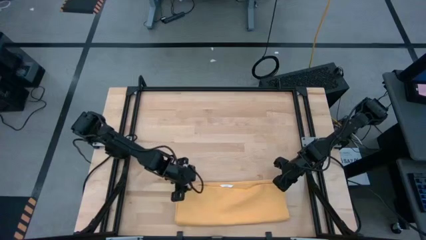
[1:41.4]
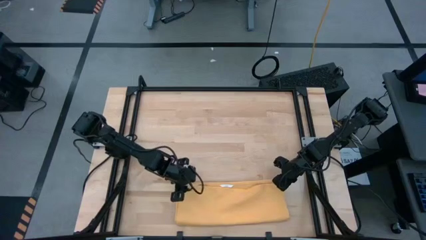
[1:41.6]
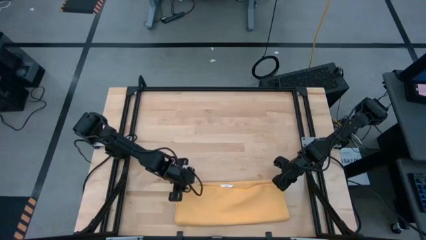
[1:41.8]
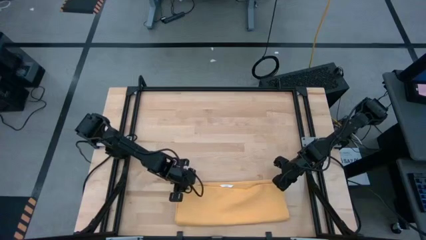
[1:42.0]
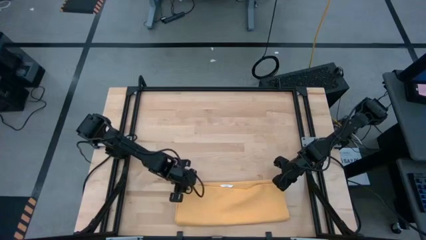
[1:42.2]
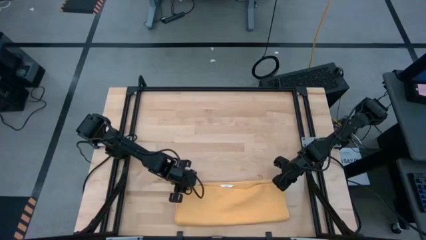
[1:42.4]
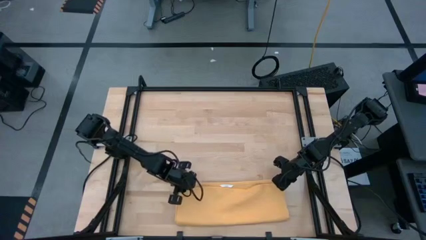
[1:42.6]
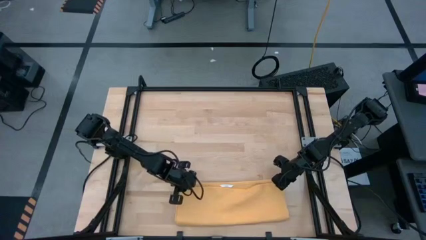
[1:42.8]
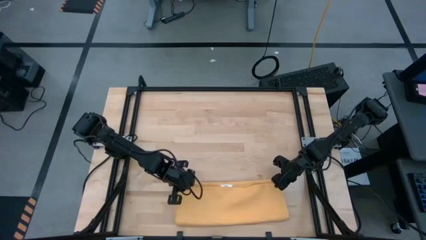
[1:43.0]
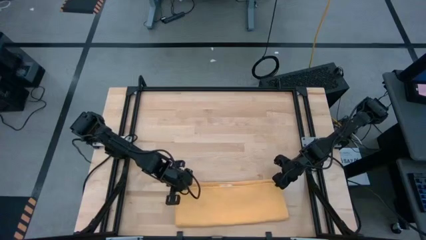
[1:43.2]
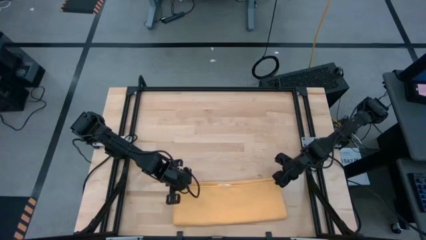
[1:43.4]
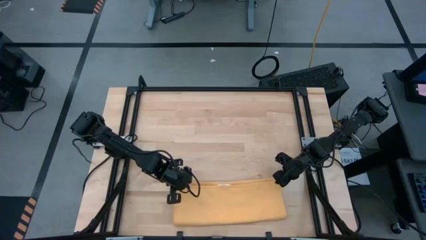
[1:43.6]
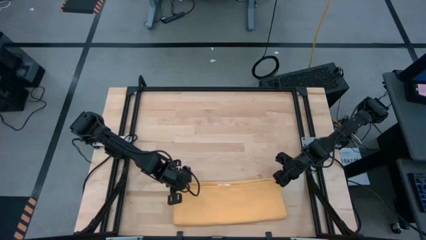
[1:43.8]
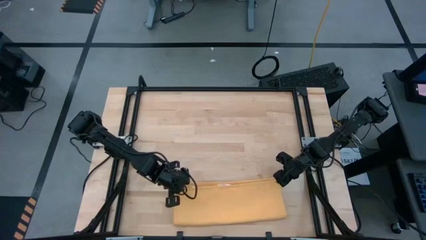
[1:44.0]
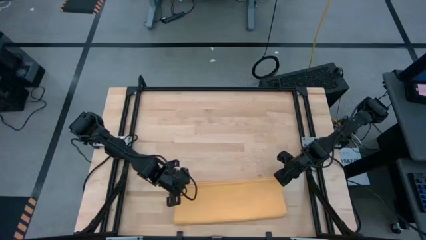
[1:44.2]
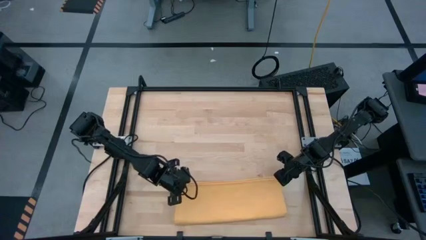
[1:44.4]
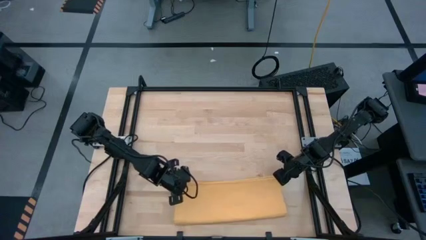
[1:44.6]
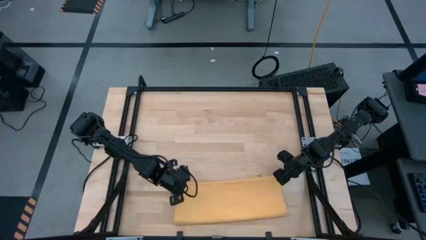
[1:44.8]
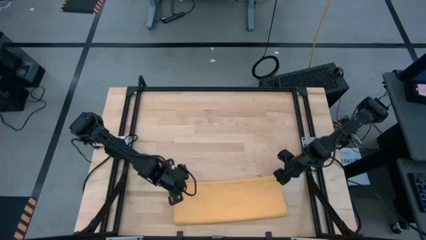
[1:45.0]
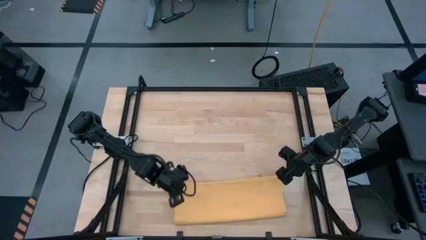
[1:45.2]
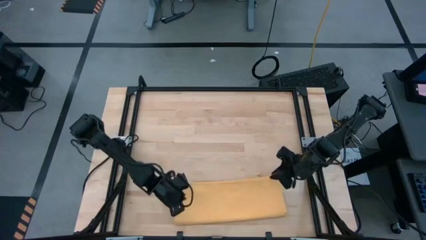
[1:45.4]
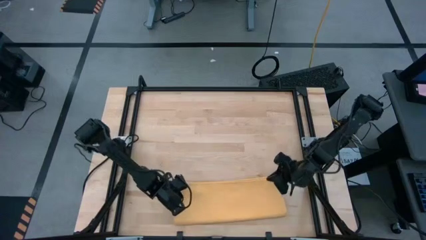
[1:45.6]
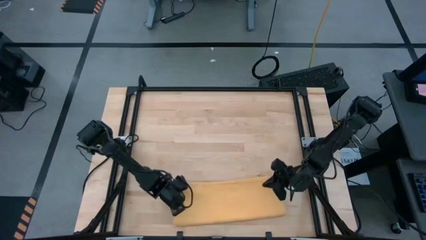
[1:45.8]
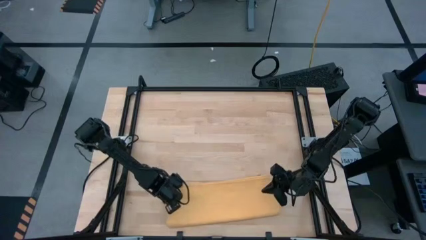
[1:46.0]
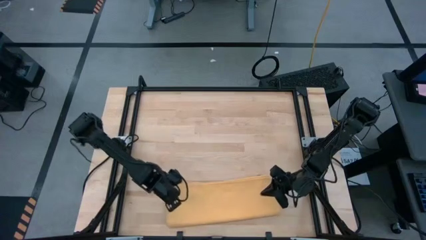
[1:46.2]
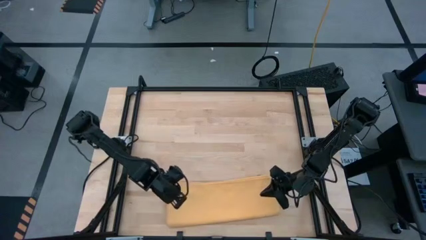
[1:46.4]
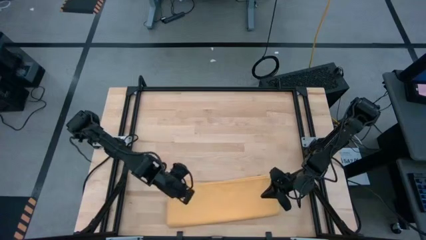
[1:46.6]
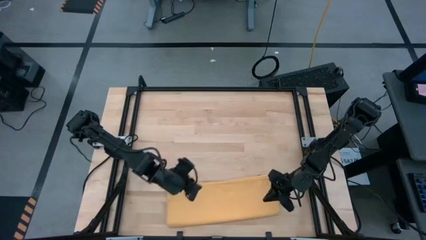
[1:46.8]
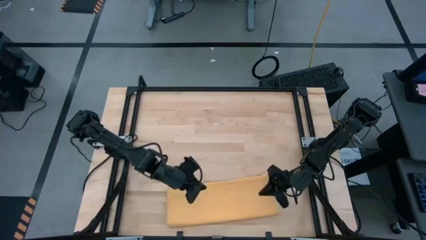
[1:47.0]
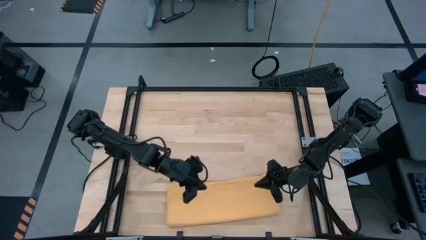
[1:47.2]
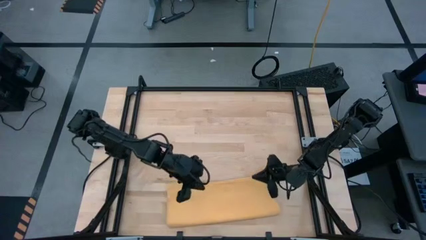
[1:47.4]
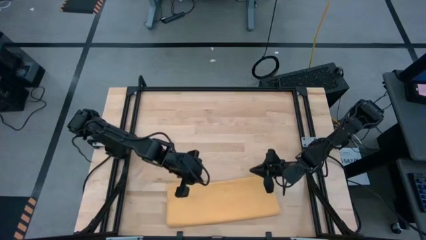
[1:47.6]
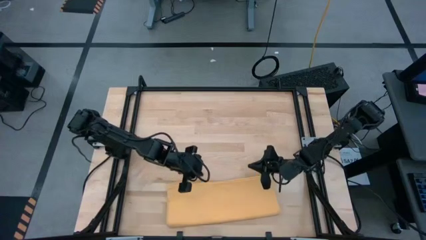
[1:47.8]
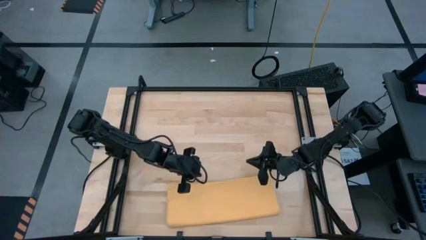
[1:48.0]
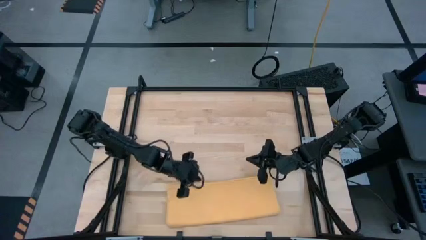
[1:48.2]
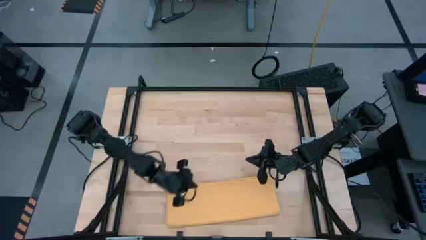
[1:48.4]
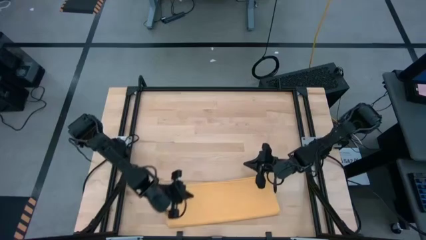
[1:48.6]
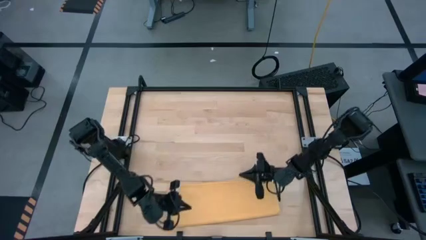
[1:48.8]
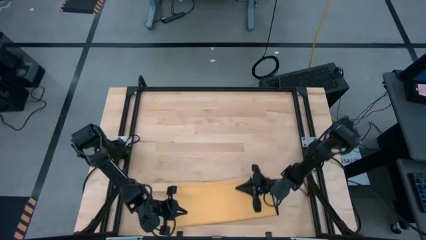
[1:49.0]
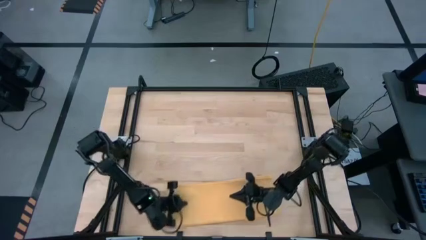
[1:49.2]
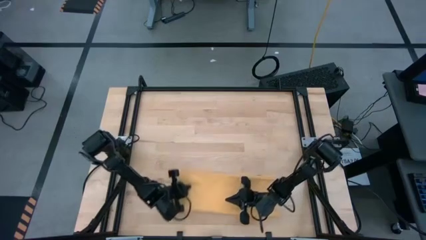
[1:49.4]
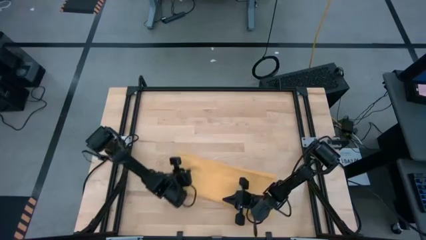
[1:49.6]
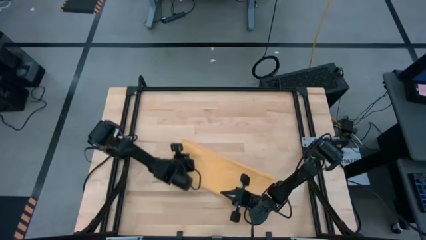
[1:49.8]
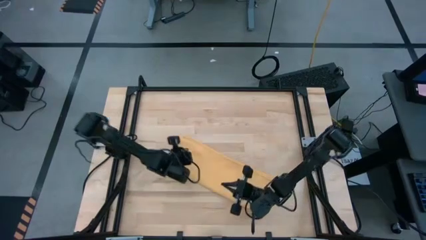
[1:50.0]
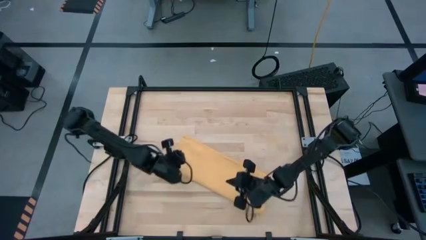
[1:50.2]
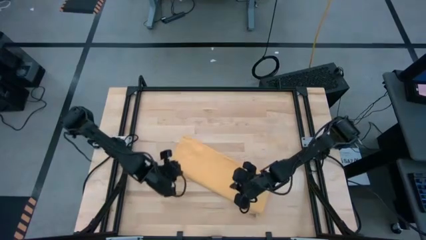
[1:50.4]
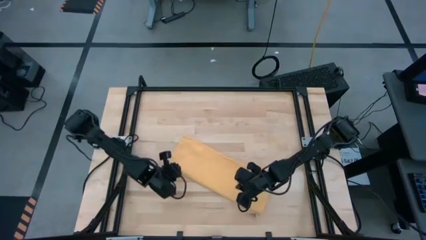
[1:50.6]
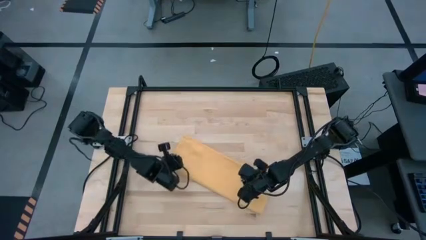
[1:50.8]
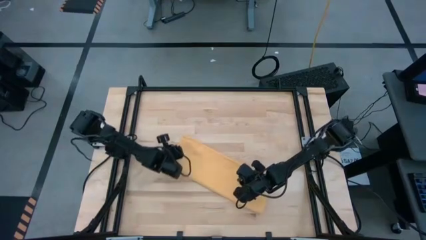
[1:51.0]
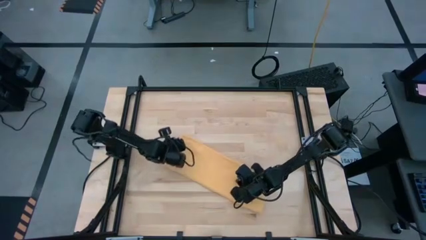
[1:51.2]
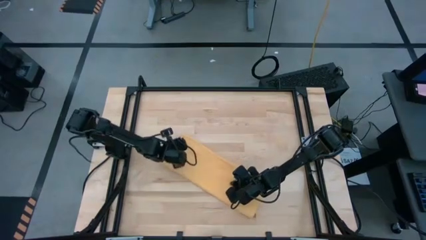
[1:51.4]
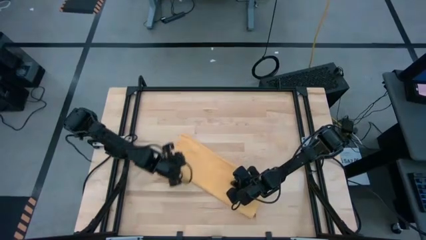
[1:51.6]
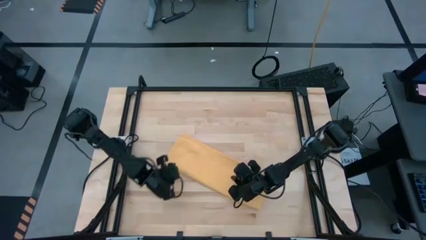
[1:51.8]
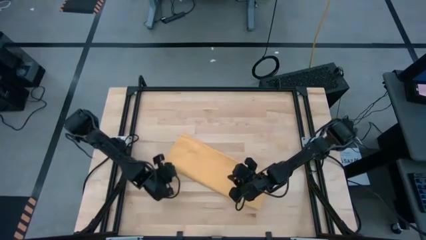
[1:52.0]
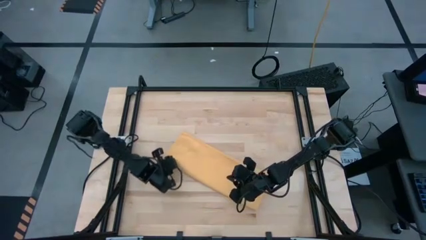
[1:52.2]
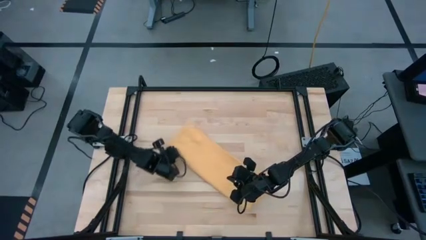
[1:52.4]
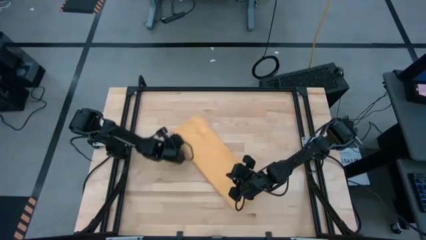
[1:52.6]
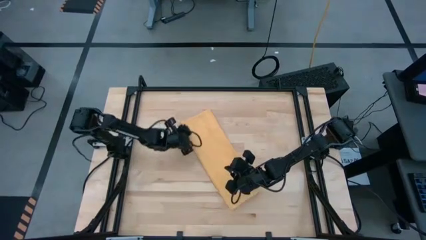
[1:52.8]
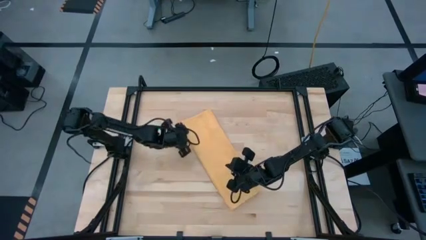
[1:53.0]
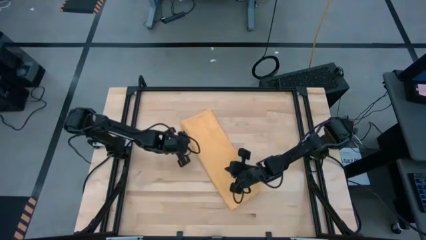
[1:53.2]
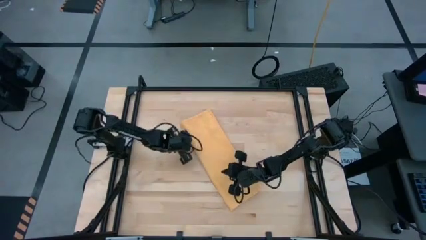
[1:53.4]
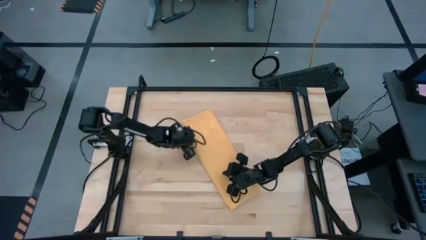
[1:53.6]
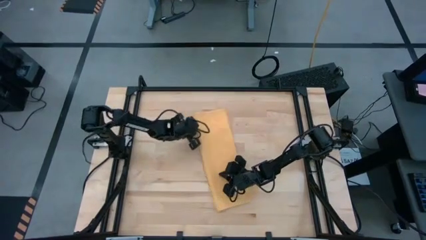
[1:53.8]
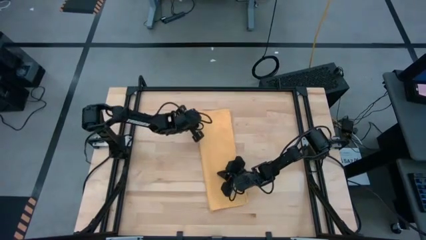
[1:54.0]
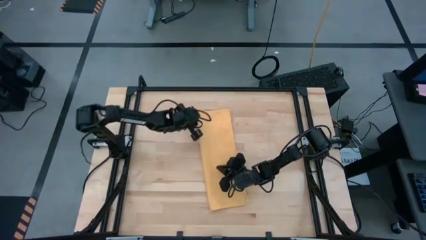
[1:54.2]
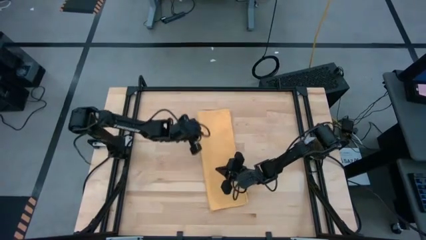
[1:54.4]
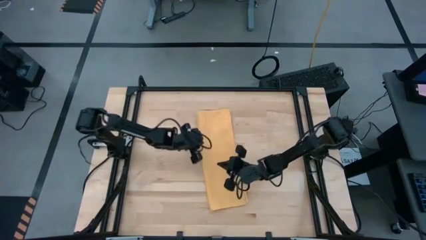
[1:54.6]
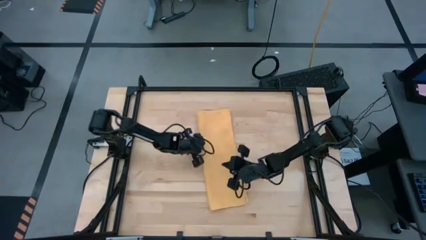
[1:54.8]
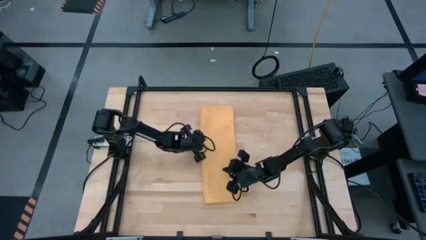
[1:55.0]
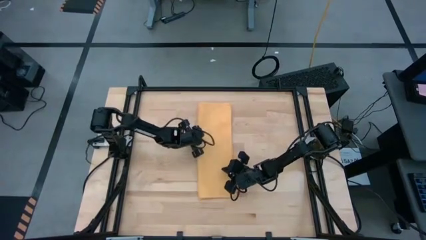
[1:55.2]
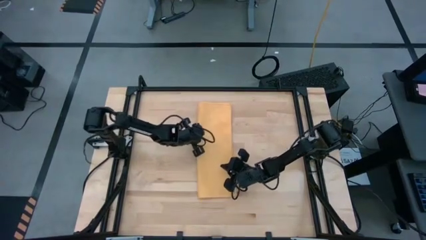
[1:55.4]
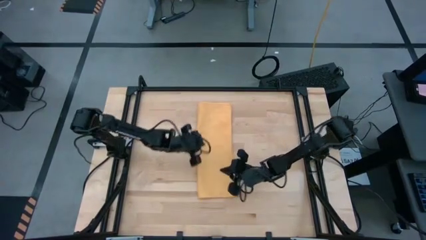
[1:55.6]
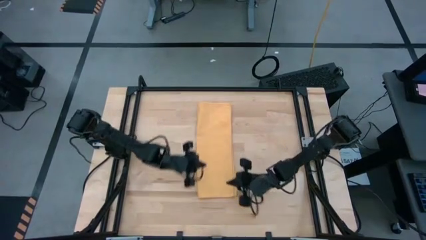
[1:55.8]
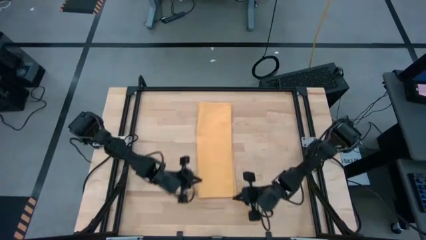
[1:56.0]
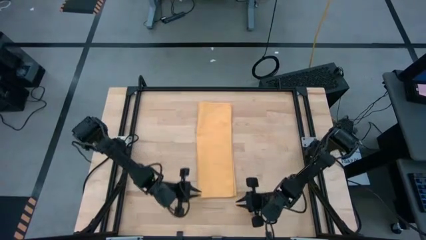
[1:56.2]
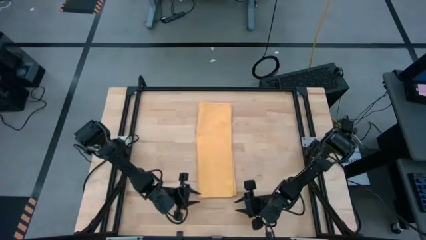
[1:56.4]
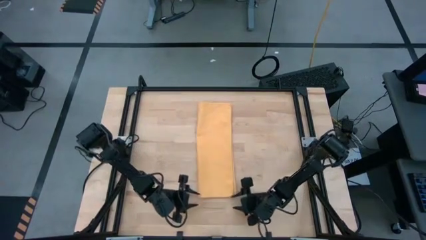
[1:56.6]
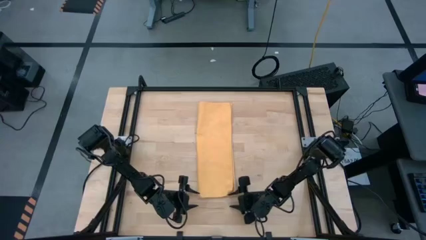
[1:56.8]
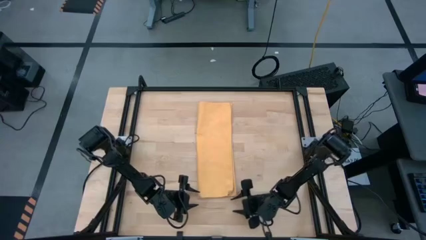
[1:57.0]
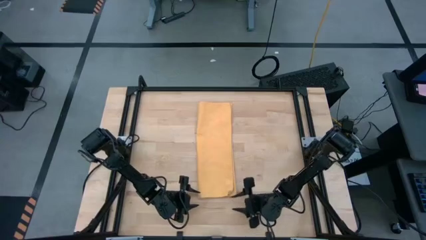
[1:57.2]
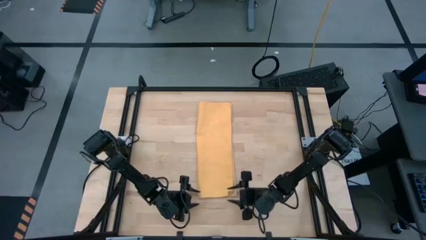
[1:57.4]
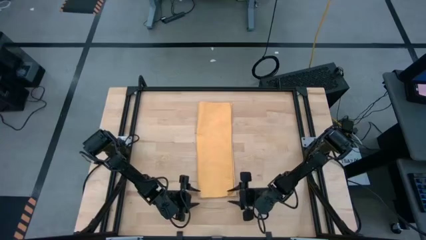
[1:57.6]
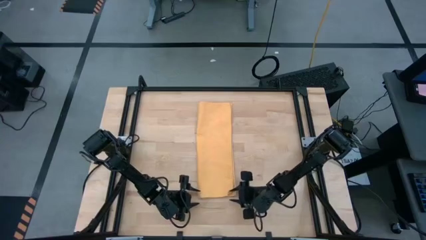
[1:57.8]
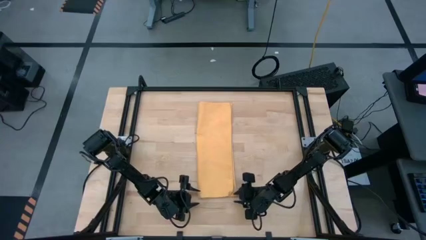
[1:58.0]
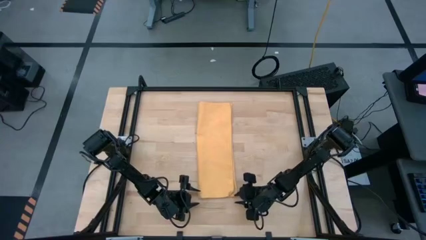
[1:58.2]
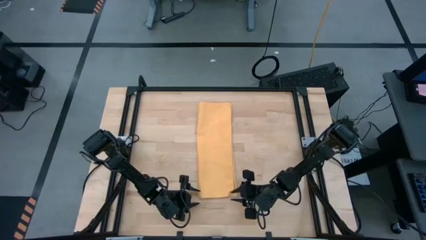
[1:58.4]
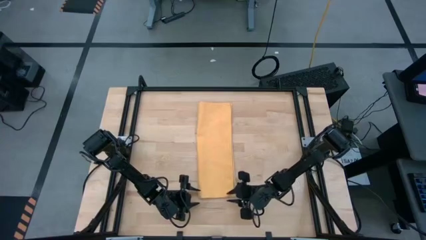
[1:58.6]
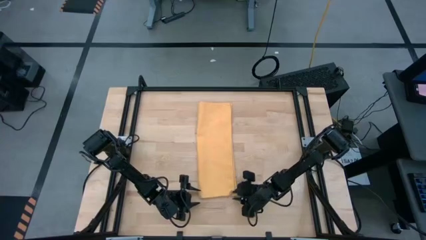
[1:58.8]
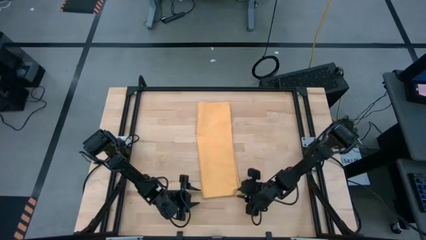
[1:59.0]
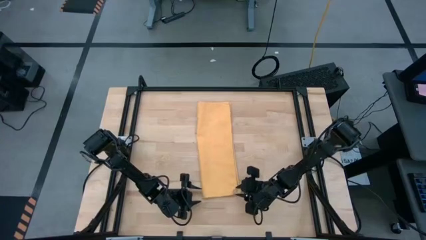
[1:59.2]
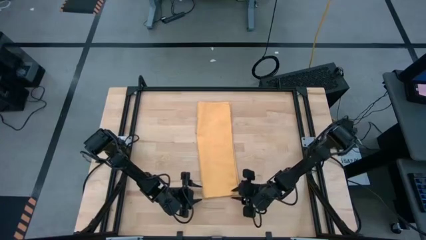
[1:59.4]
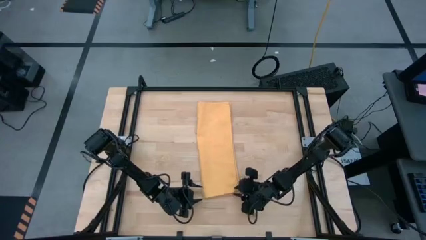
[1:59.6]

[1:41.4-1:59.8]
Task: Roll towel
Roll the yellow towel
